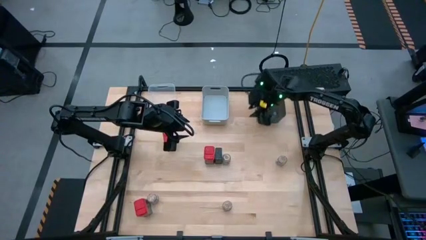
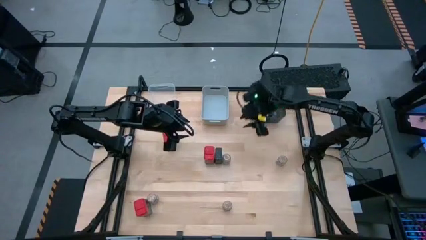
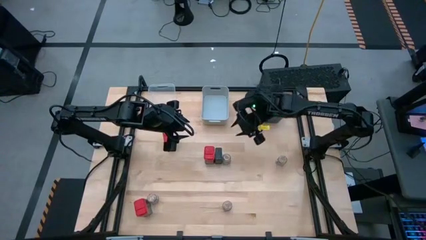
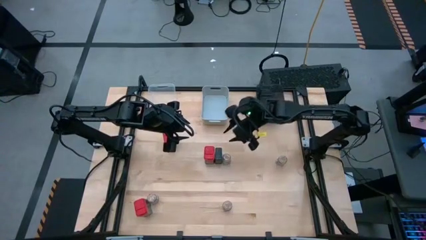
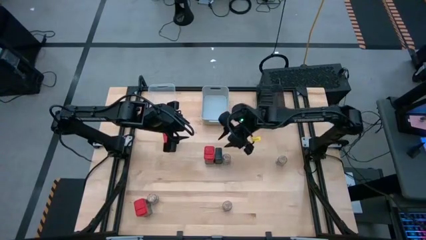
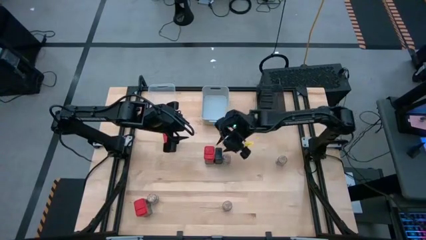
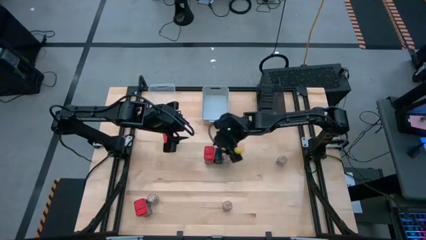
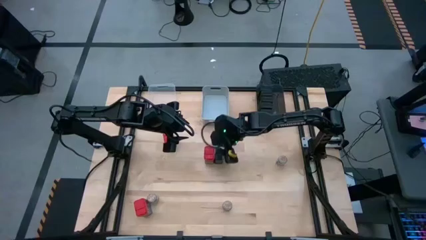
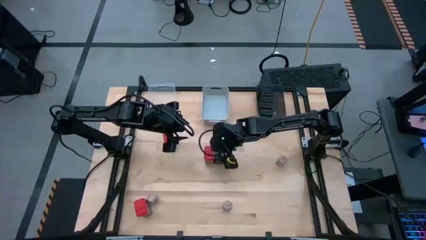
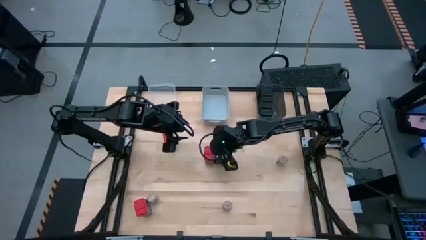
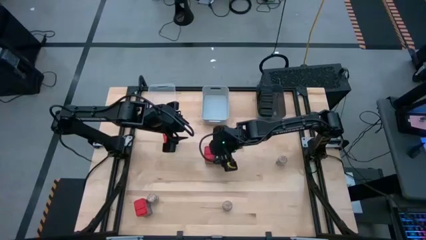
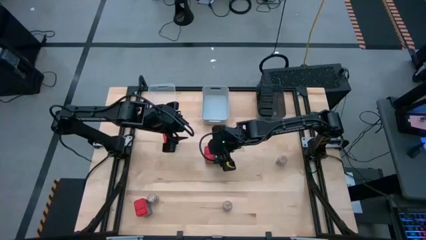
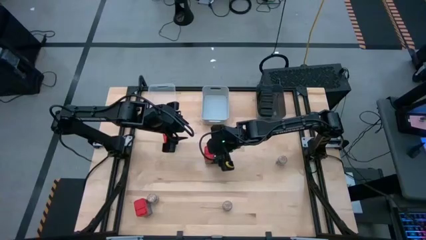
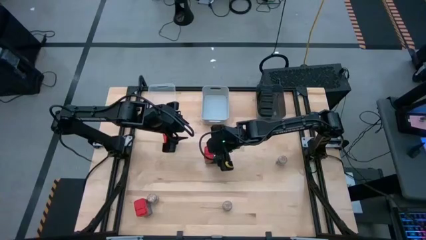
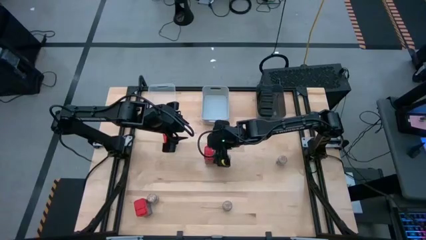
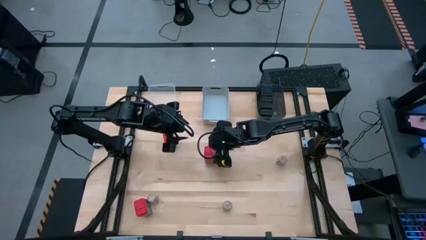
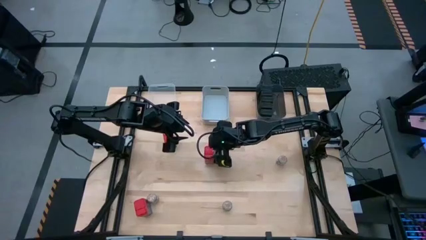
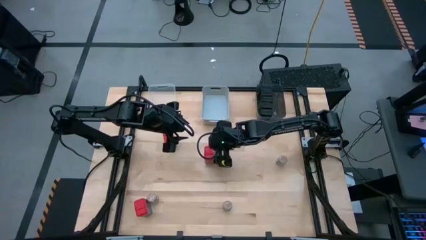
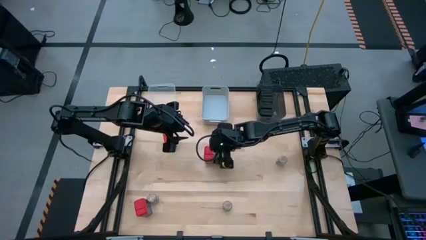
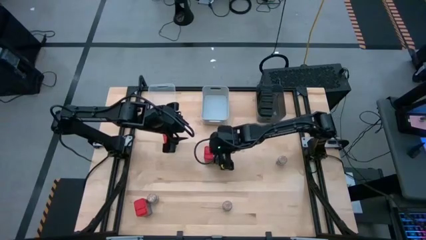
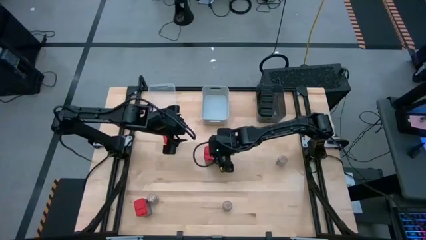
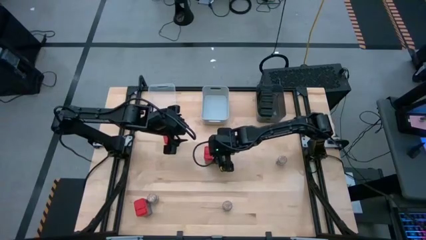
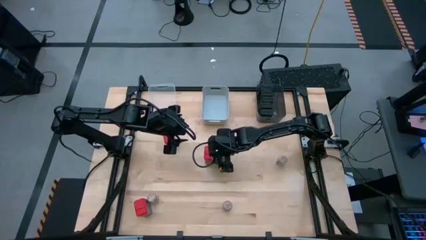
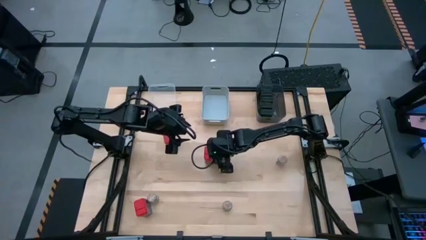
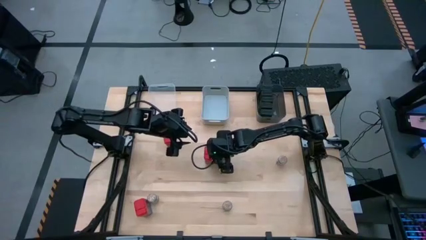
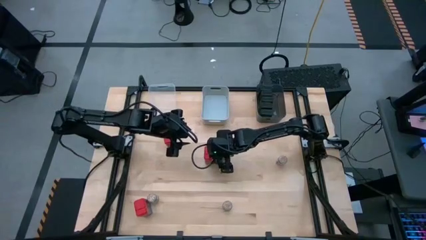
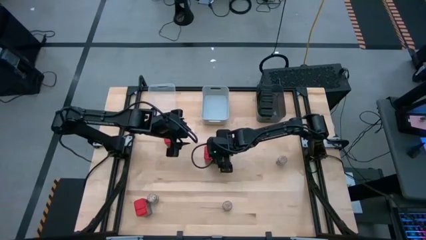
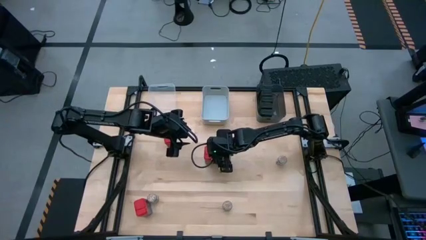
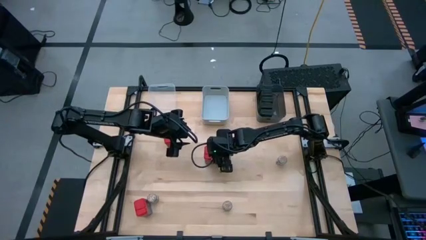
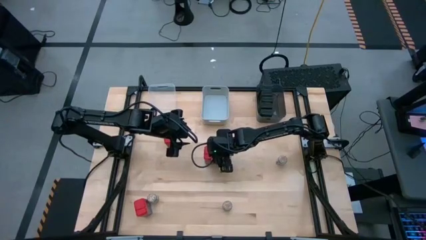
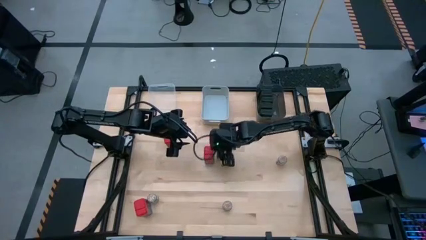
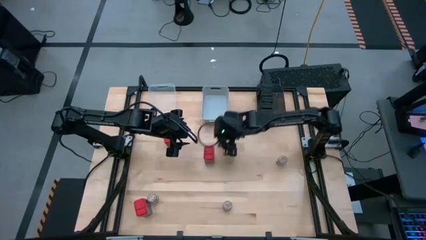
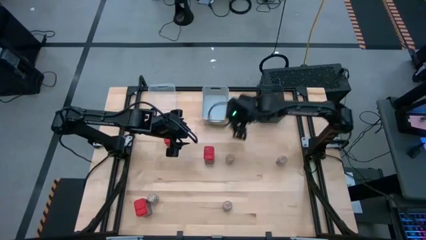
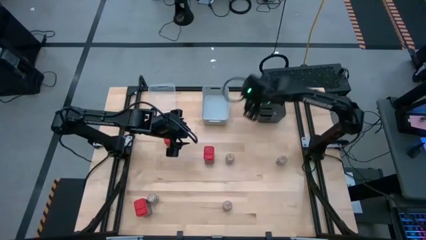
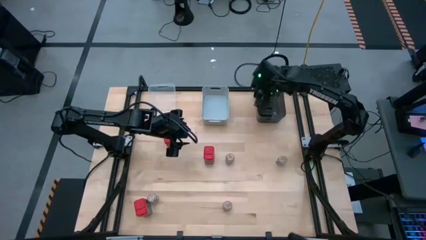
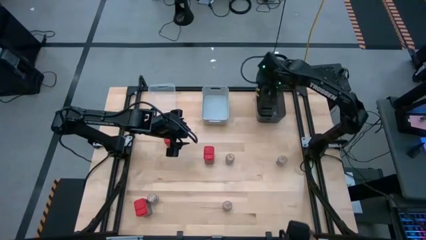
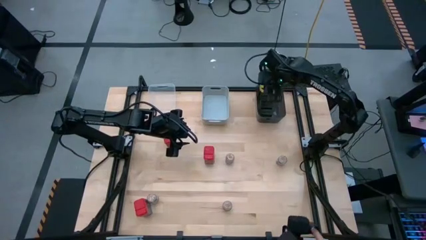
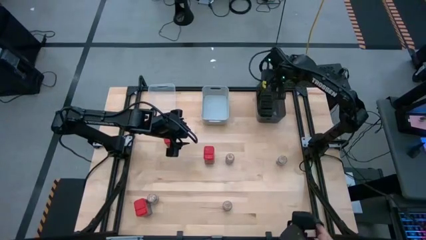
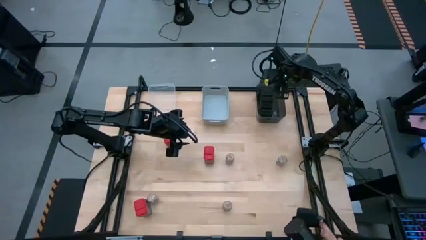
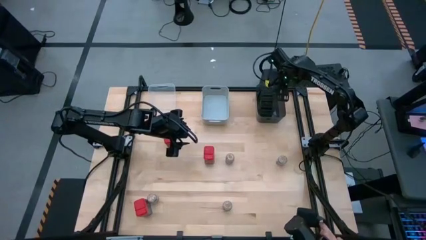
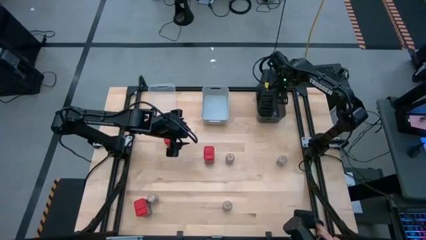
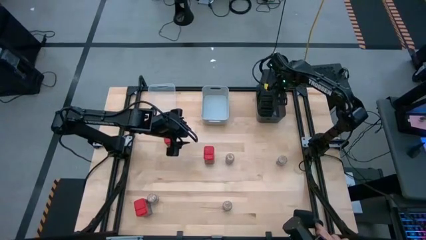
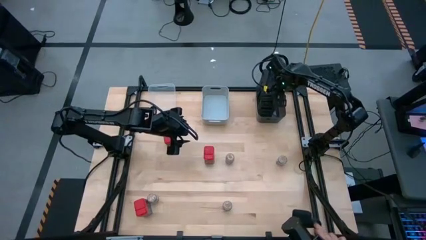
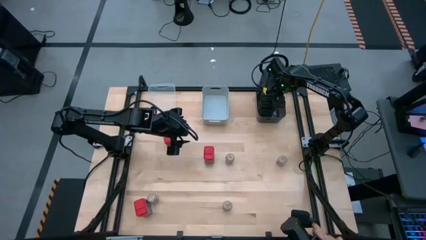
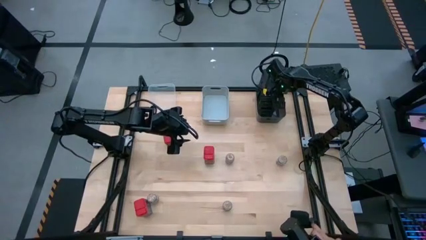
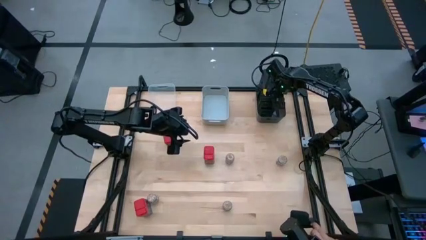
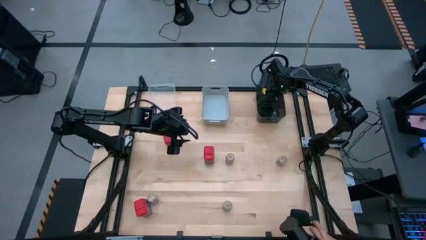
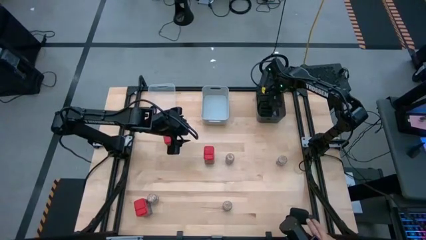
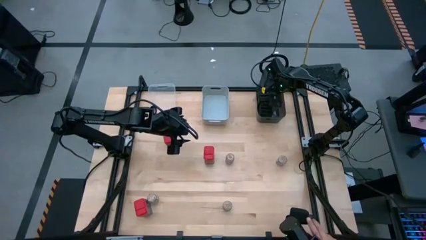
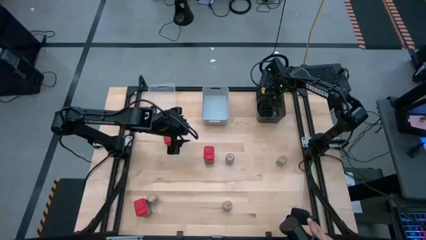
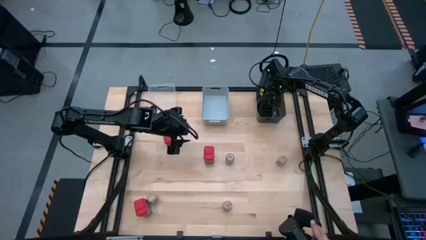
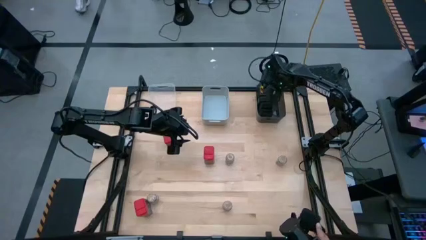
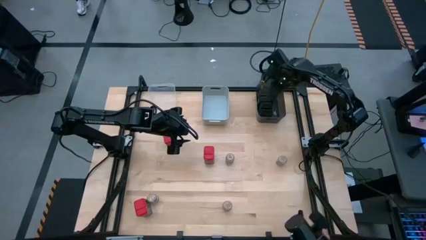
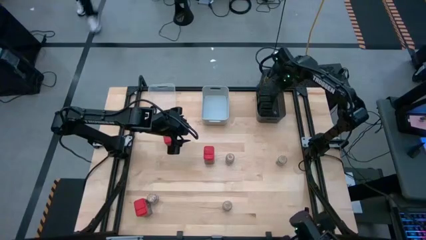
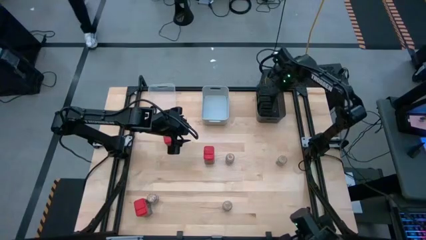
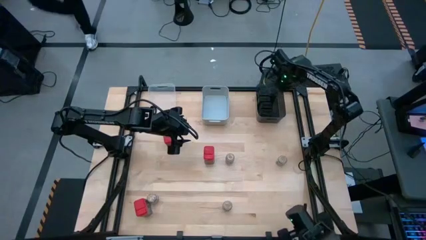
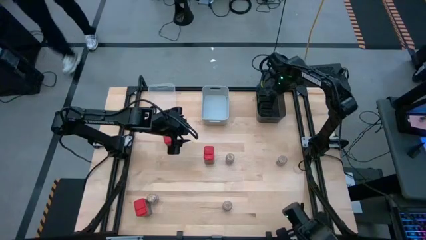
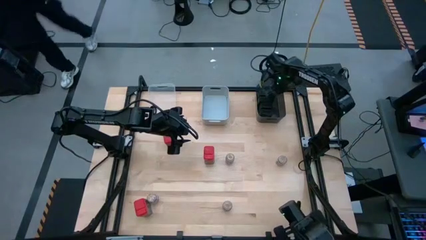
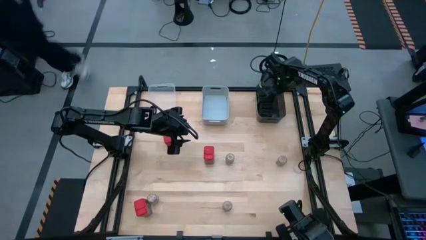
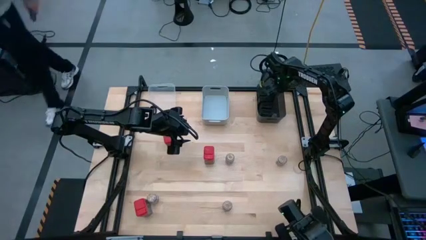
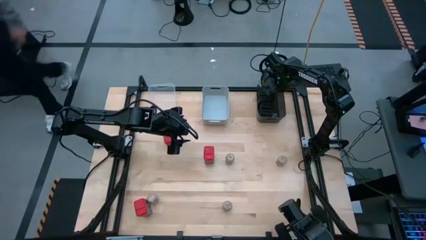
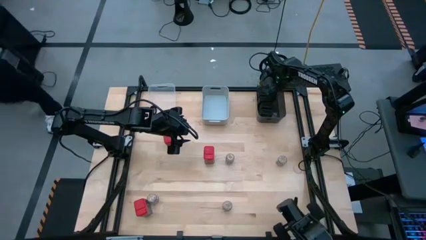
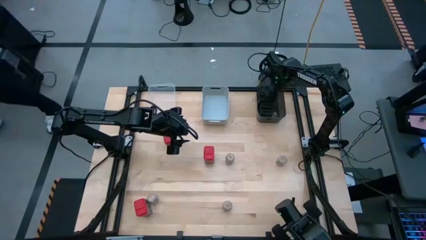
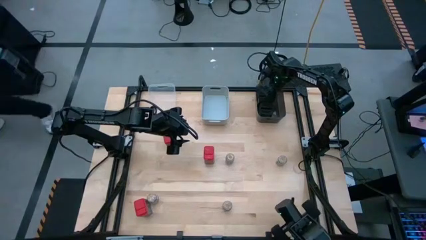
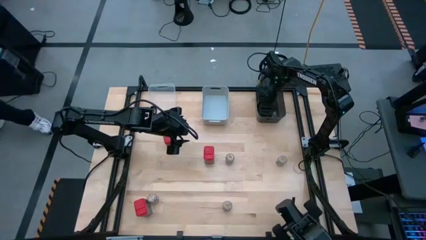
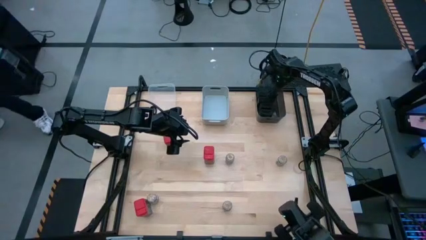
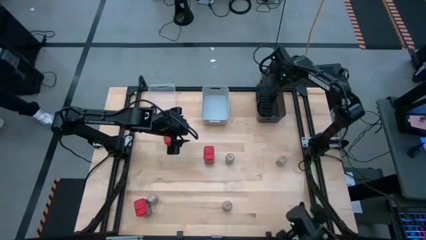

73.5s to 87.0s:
Task: Sort spices by type
Put the green seasoning can into the black bin

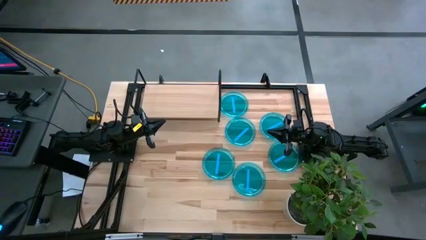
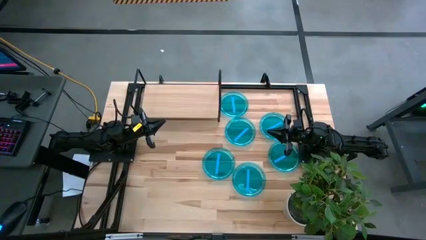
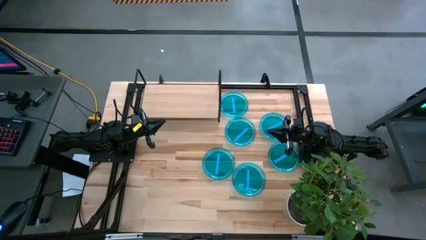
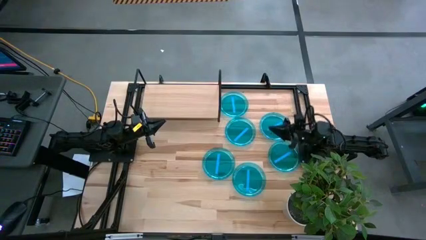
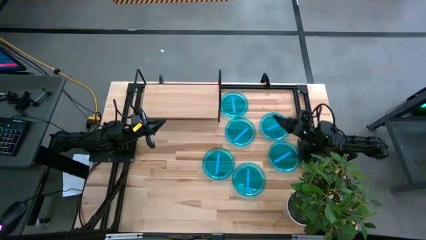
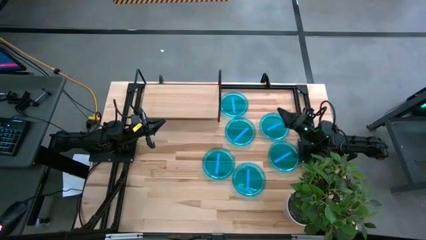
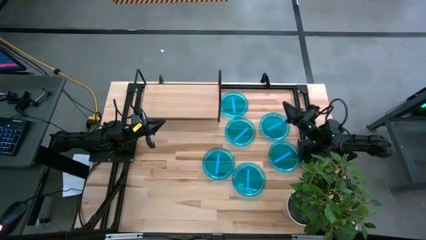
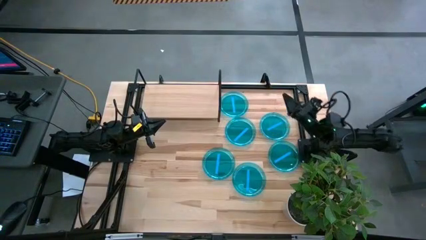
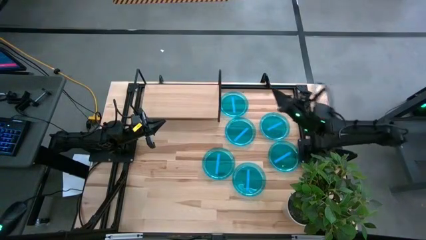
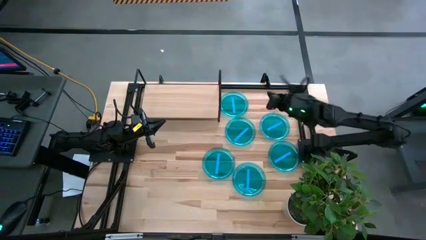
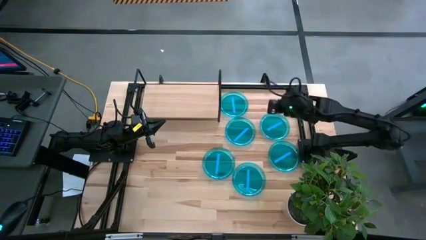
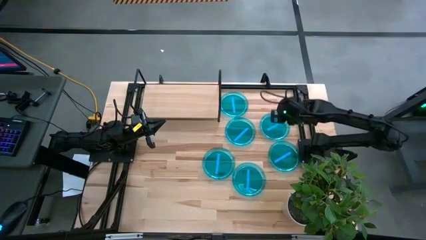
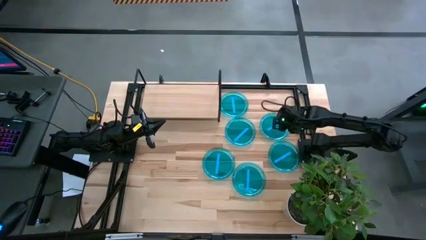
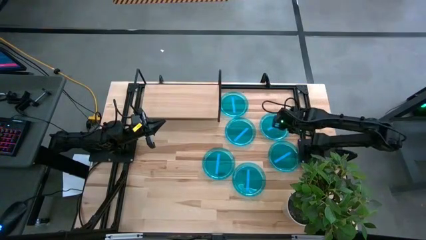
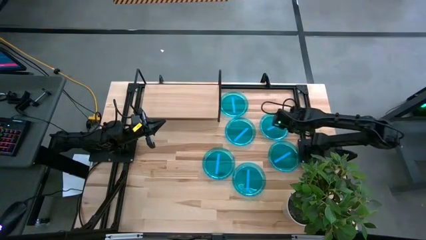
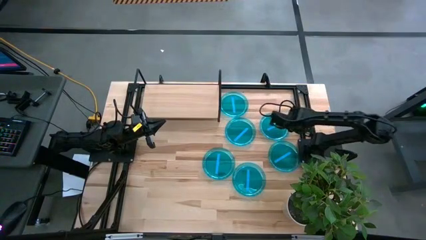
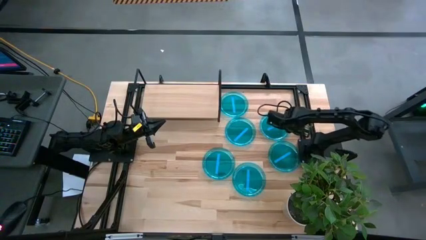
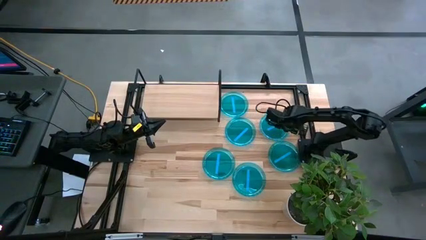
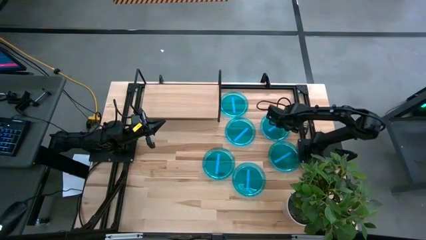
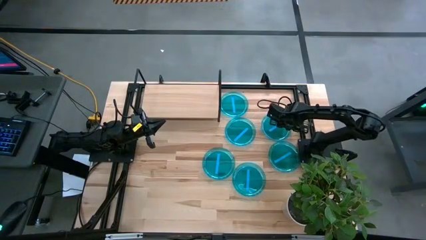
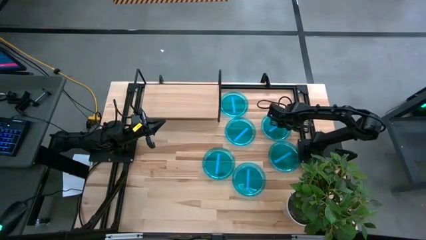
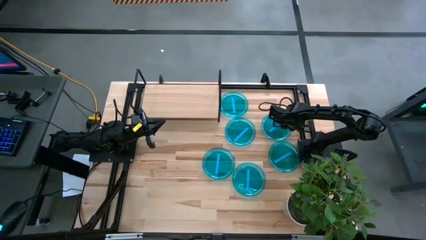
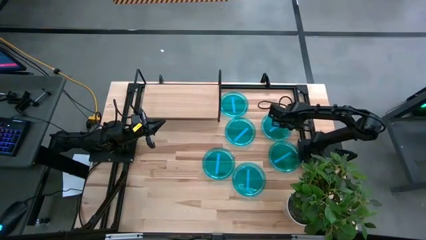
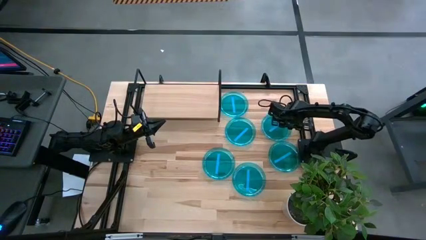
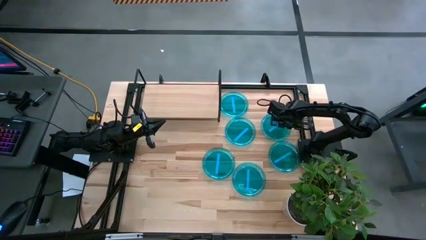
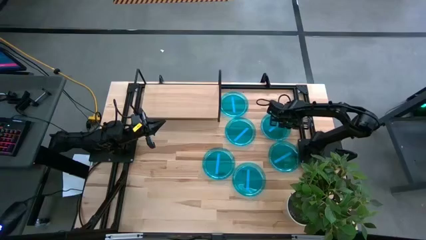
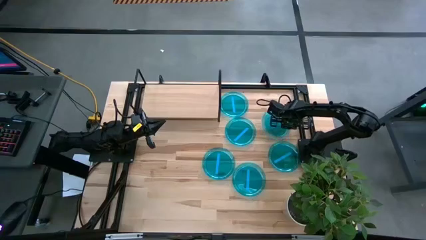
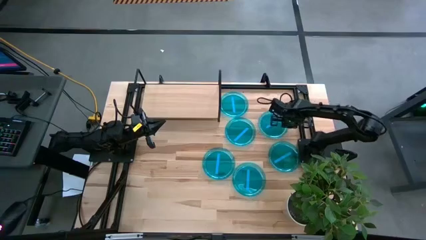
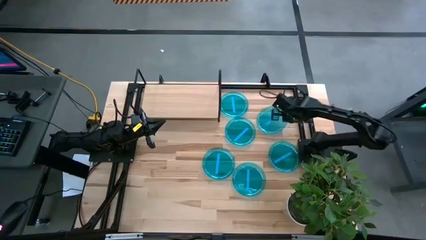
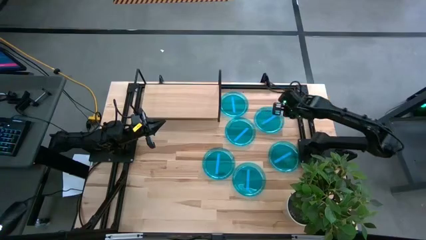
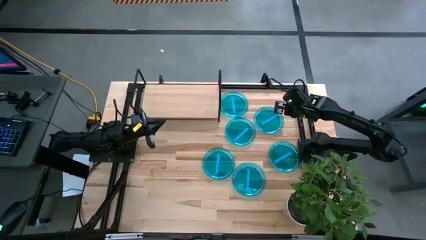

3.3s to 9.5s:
Task: Place and stack plates onto a shelf
Put the blue plate on the shelf
